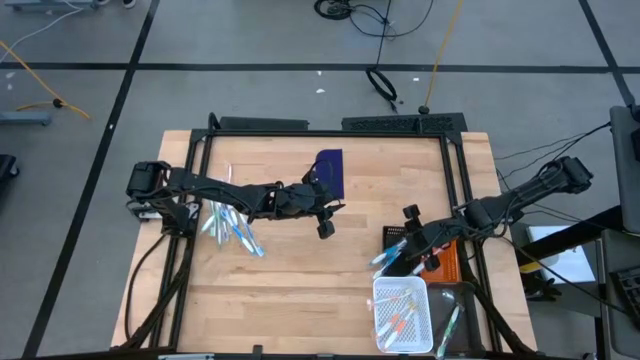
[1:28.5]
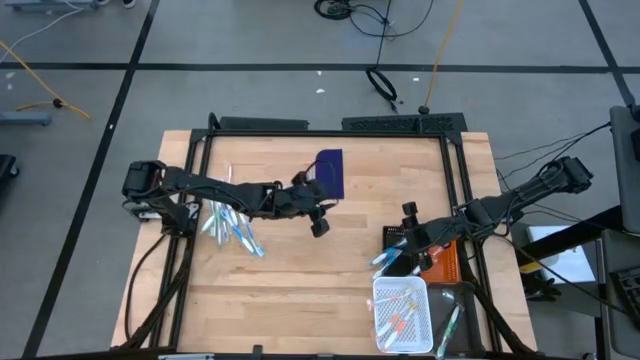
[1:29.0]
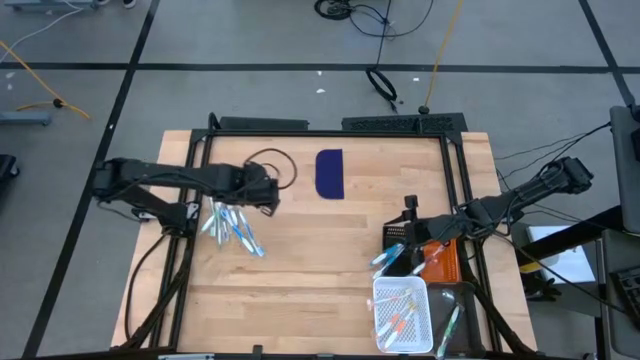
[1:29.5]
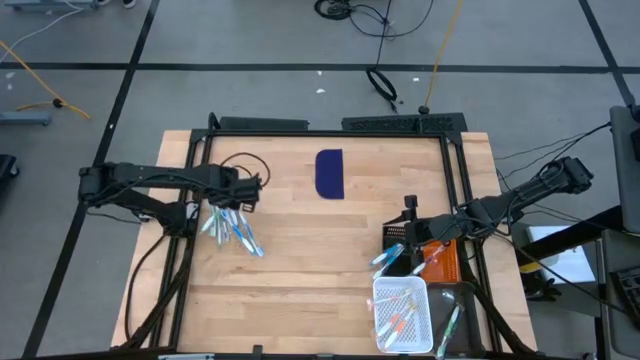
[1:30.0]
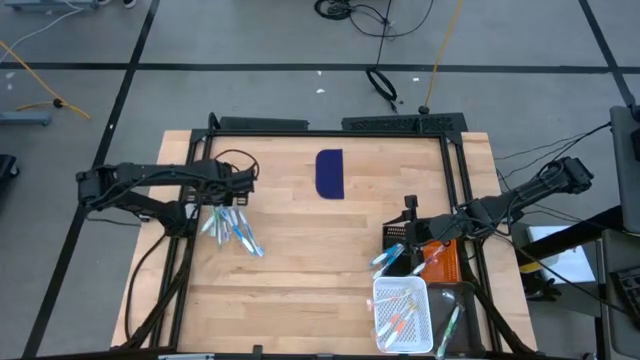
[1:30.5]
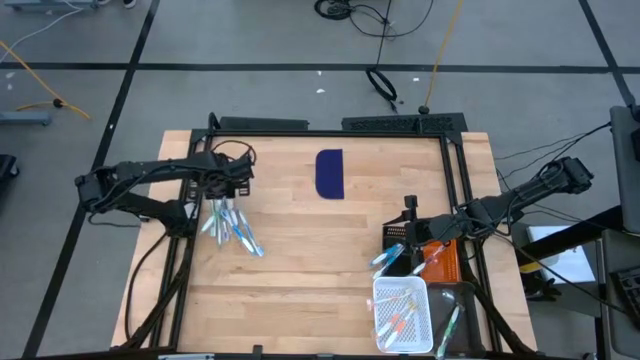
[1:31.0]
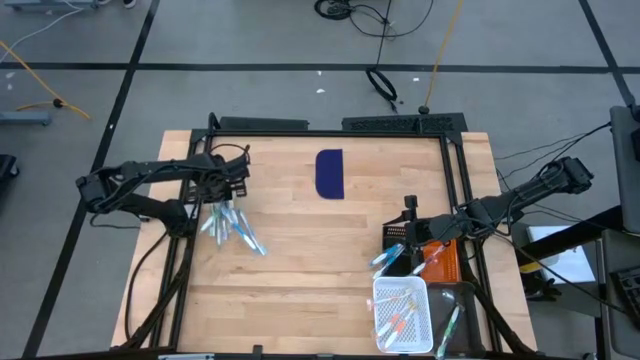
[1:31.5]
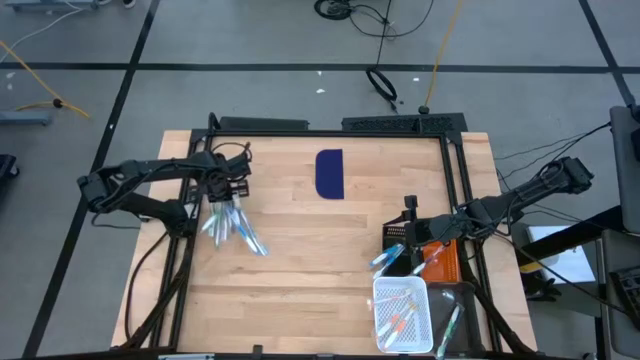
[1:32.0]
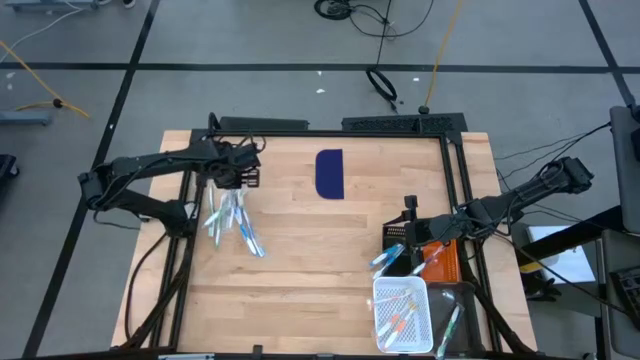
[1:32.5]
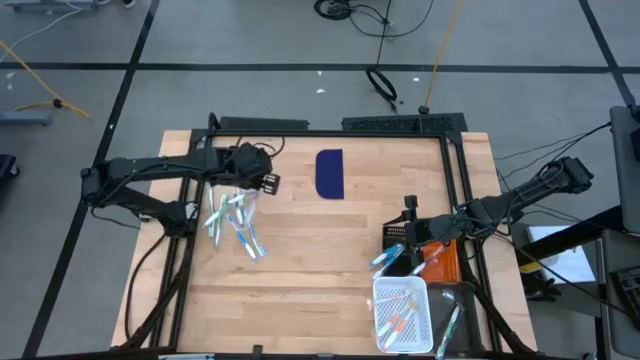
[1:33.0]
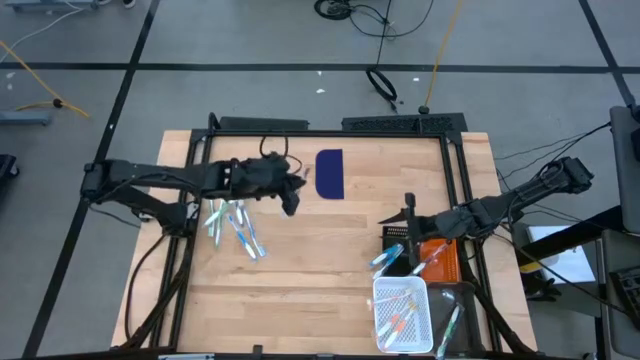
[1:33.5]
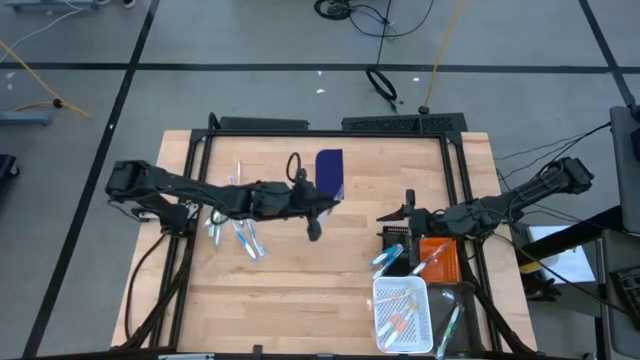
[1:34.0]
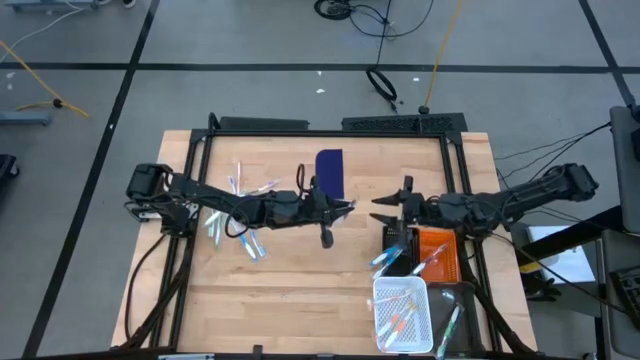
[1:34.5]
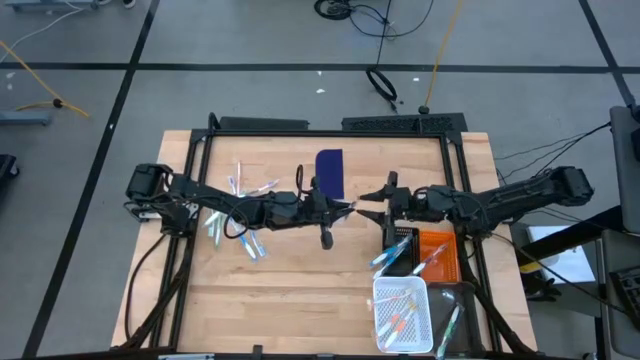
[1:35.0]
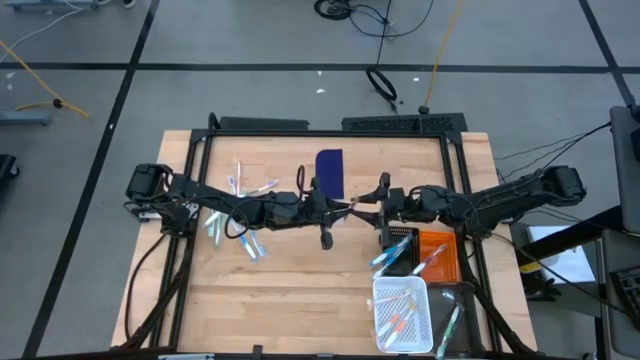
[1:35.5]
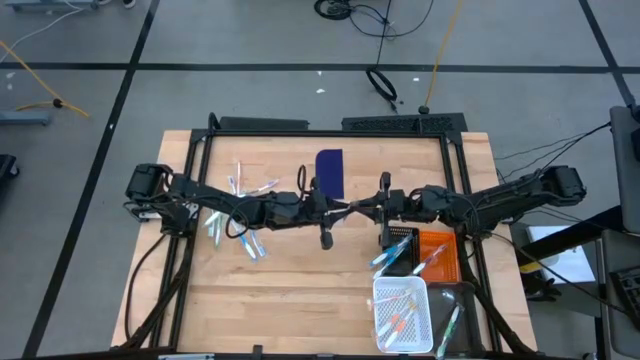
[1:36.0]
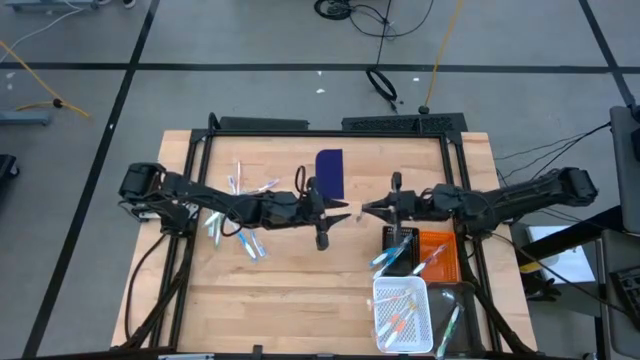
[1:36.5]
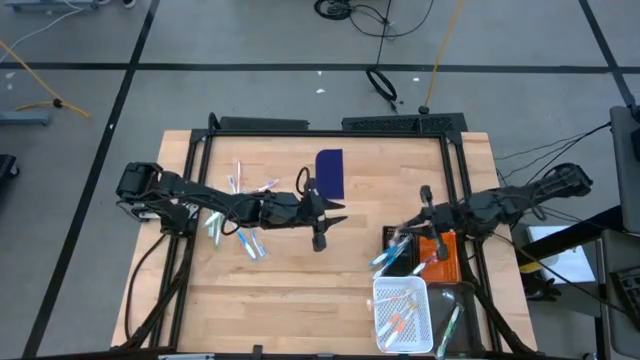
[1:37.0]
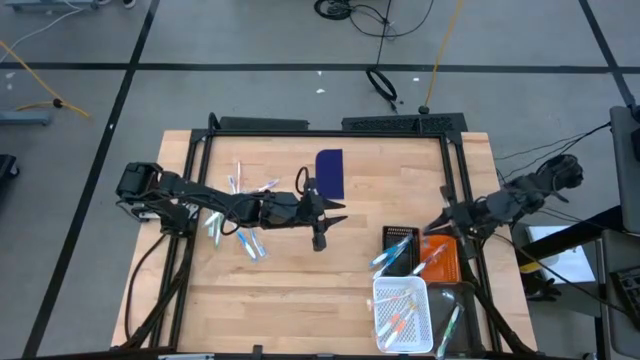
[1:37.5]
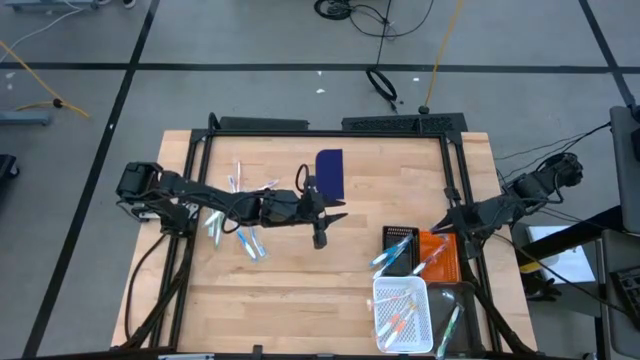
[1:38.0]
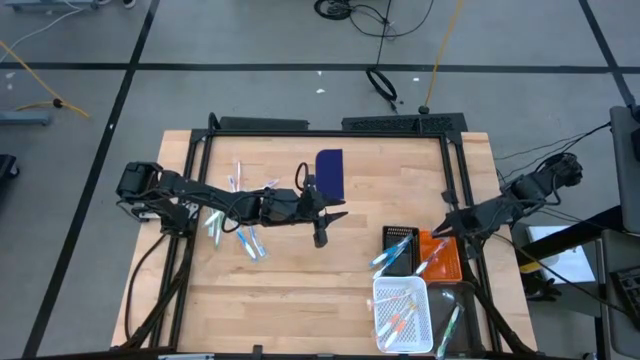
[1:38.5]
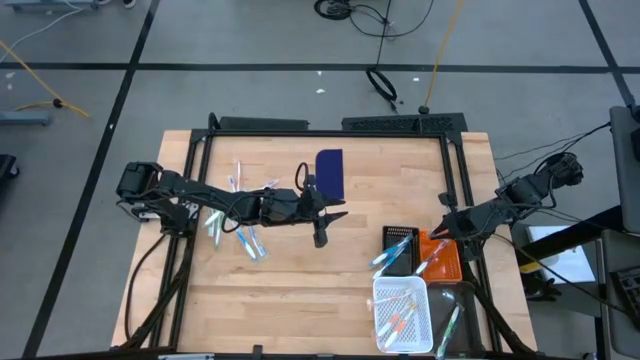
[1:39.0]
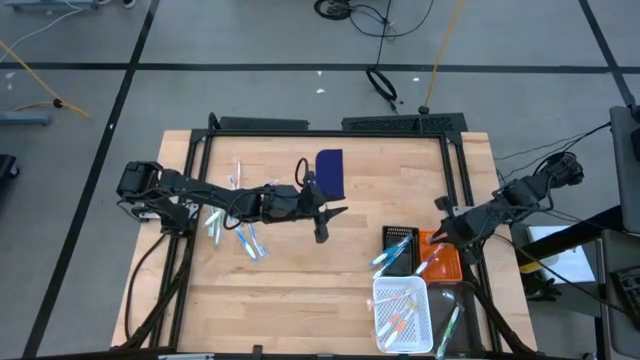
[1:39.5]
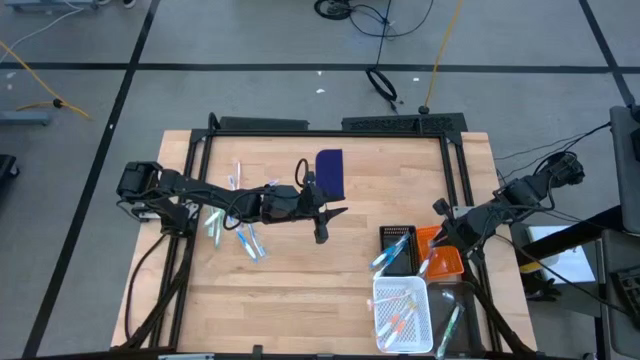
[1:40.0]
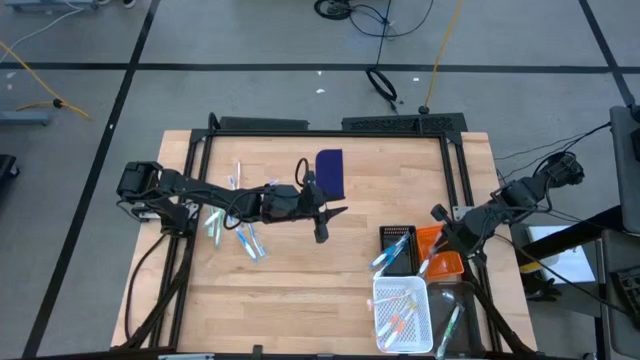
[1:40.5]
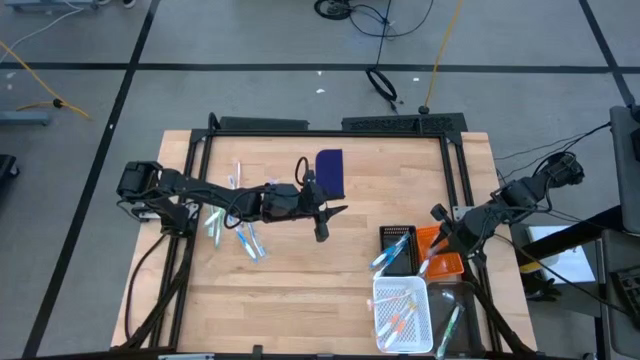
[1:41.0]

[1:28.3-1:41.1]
Task: Pick & Place Toothbrushes
Put the violet toothbrush into the orange basket

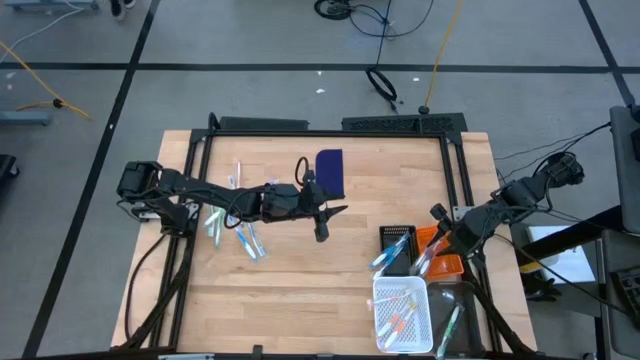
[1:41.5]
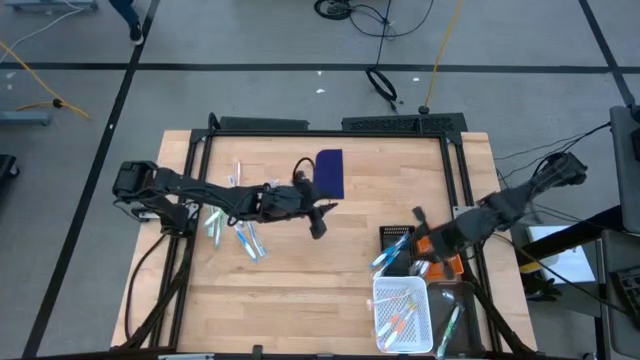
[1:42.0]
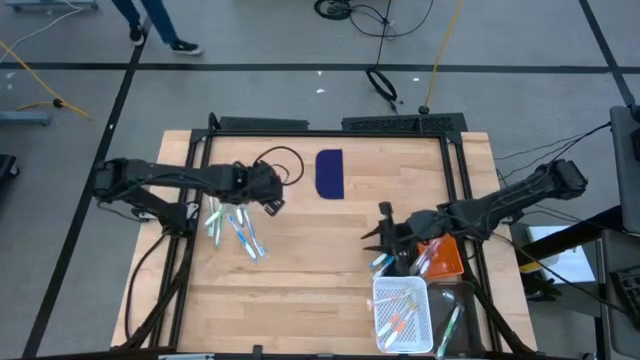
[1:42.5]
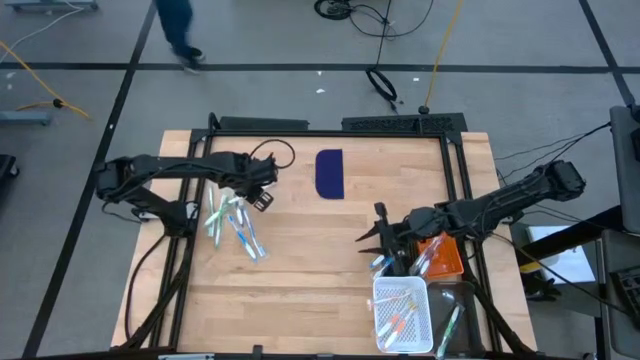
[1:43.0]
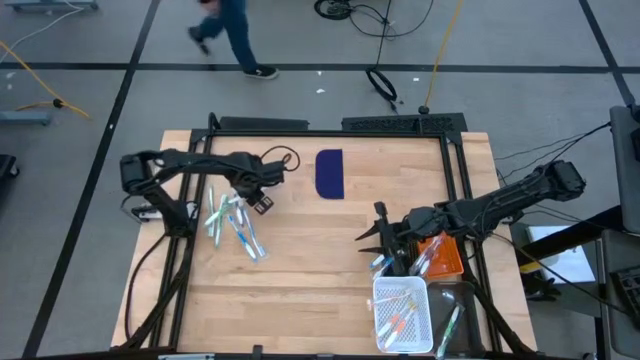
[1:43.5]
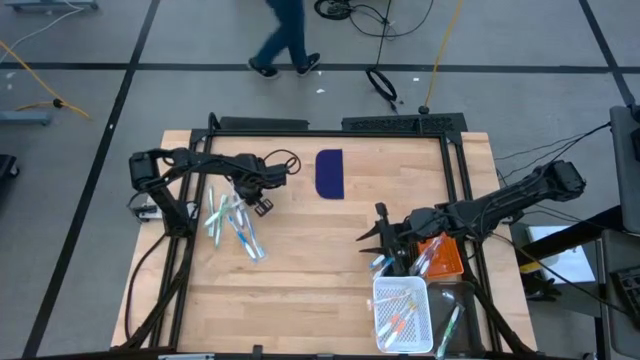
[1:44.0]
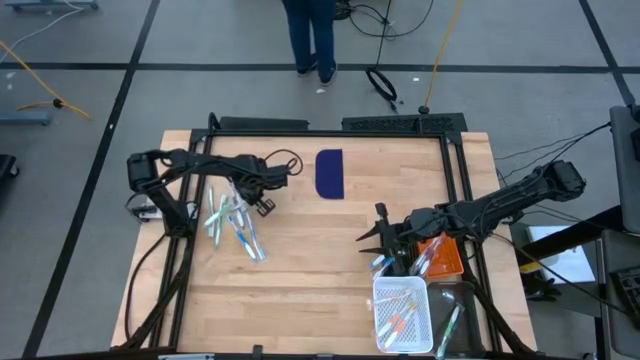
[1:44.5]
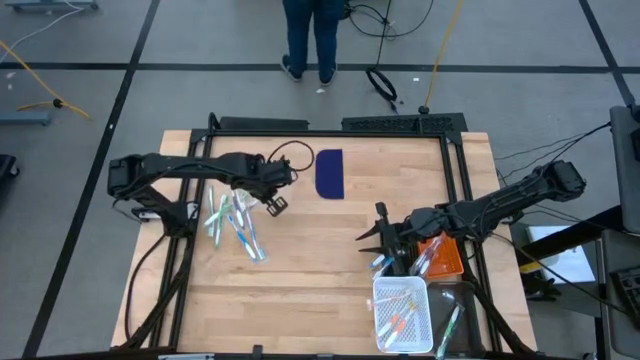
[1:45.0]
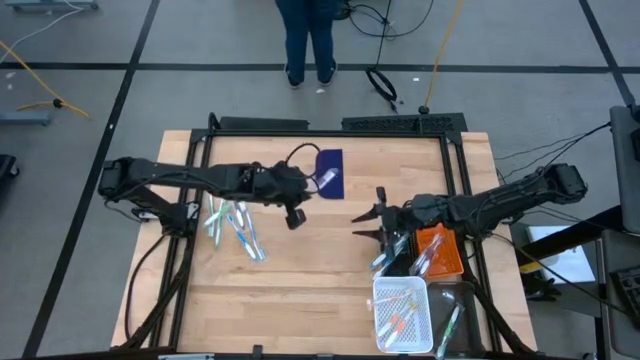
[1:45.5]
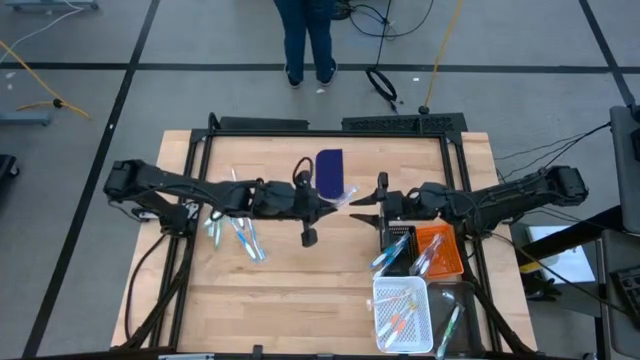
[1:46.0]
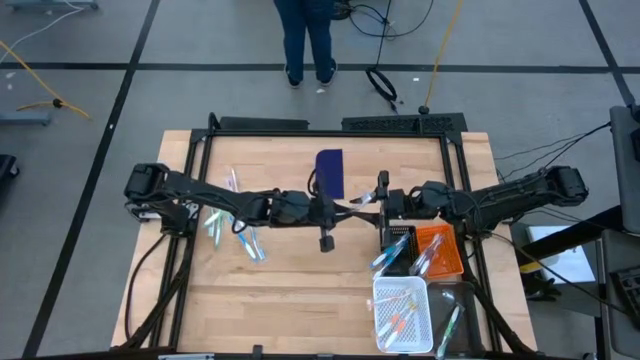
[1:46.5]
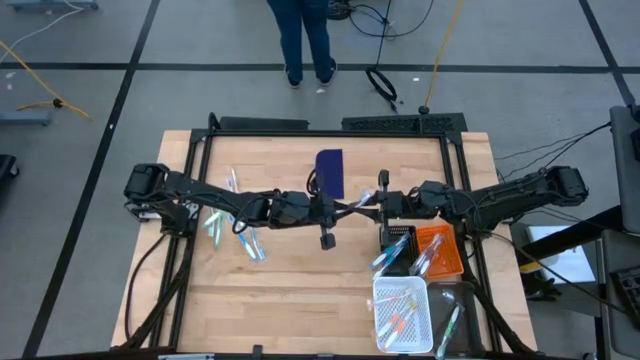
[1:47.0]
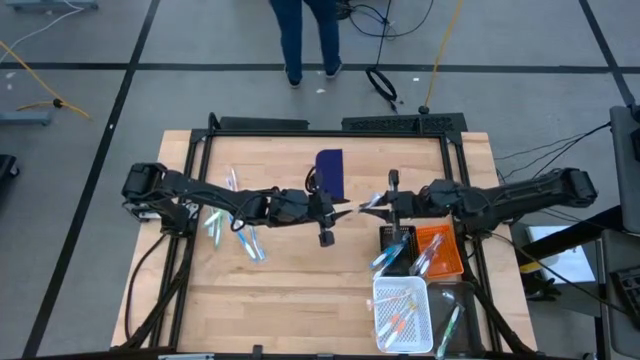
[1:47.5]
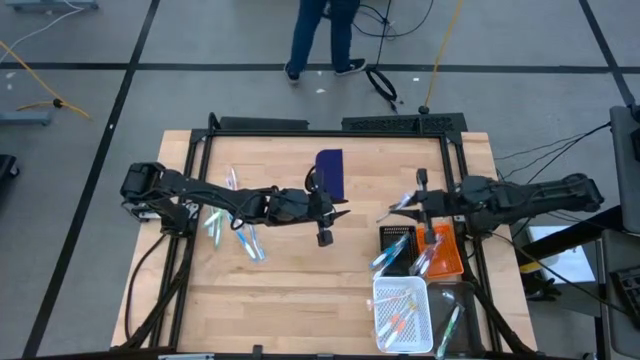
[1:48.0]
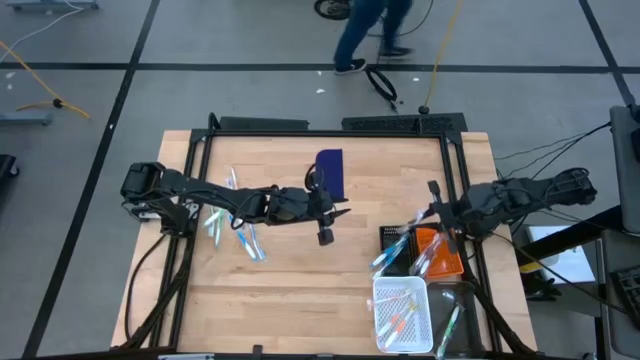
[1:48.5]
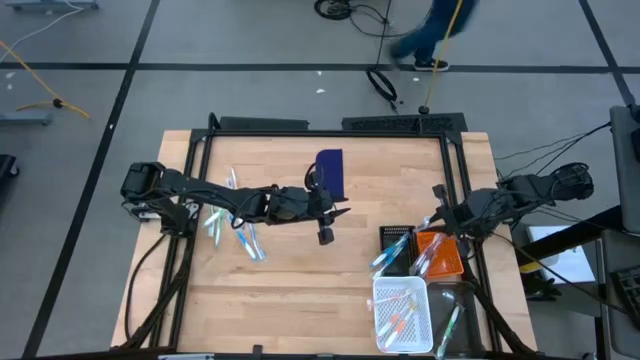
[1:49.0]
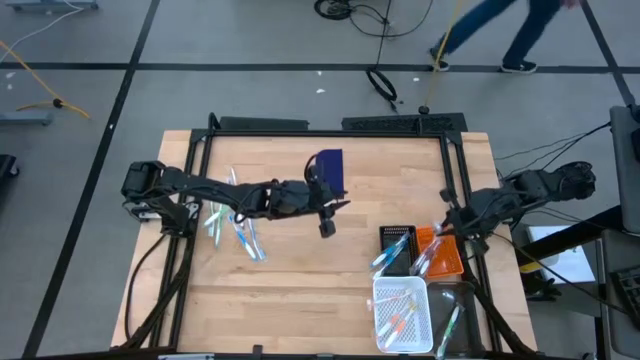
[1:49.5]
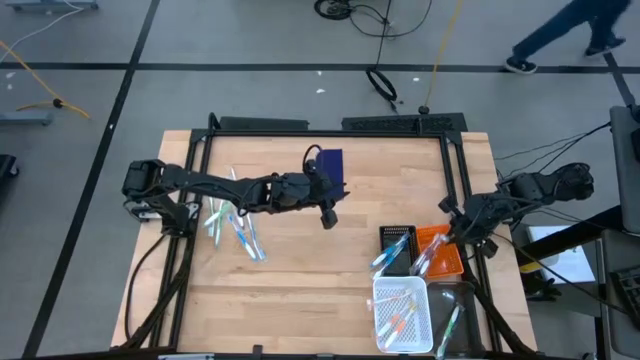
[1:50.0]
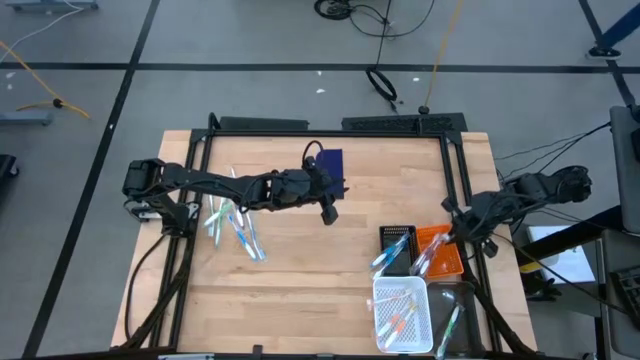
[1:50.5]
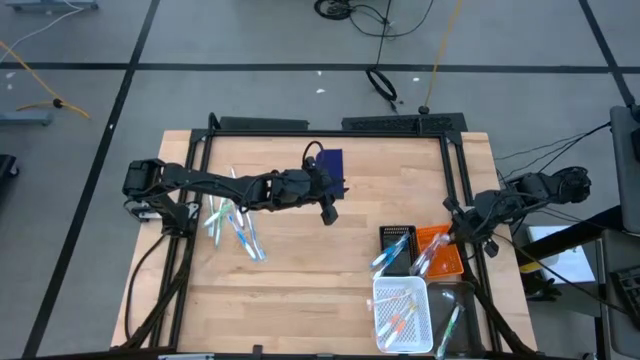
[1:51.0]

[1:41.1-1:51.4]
Put the violet toothbrush into the orange basket
